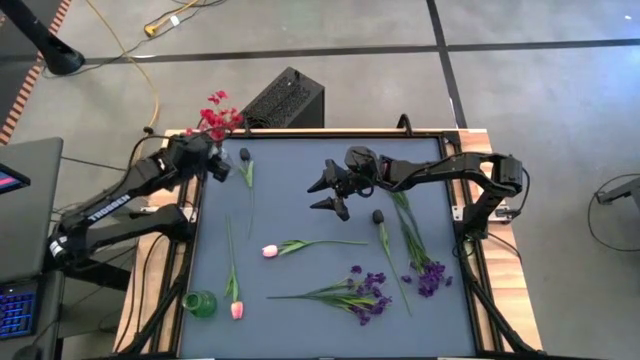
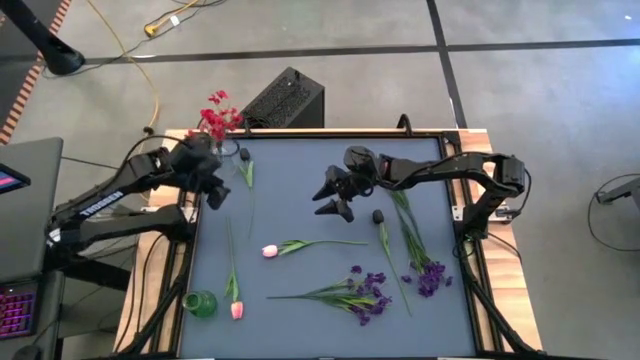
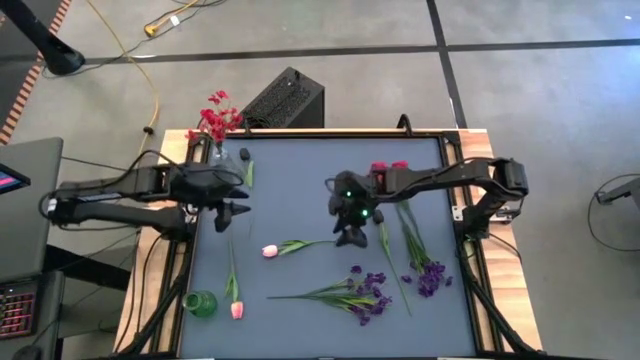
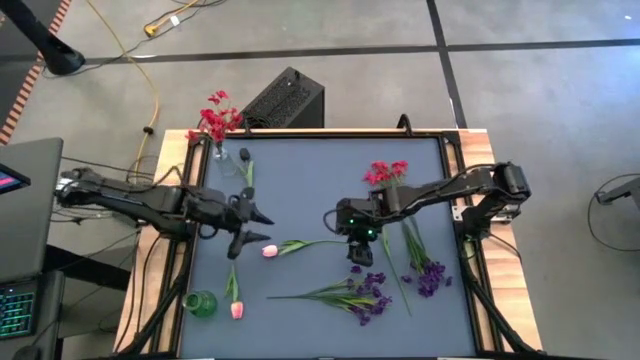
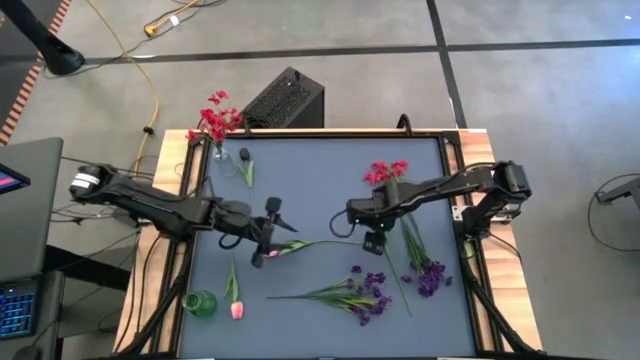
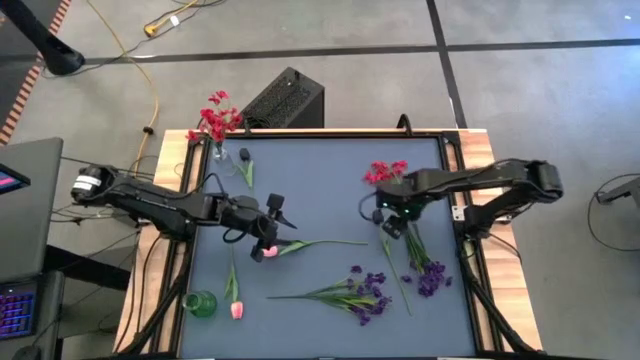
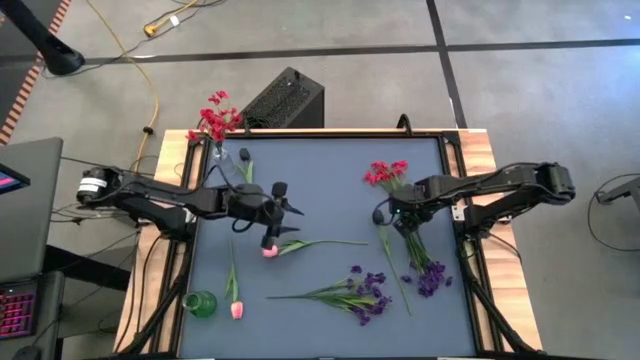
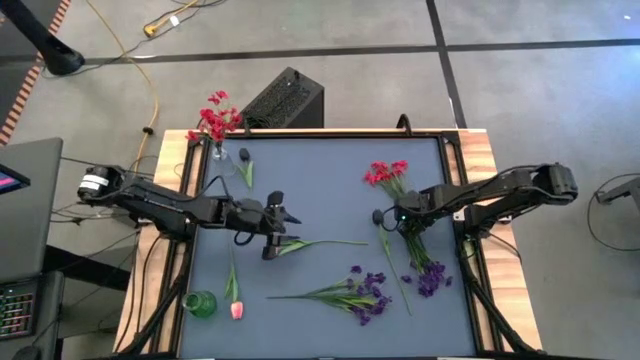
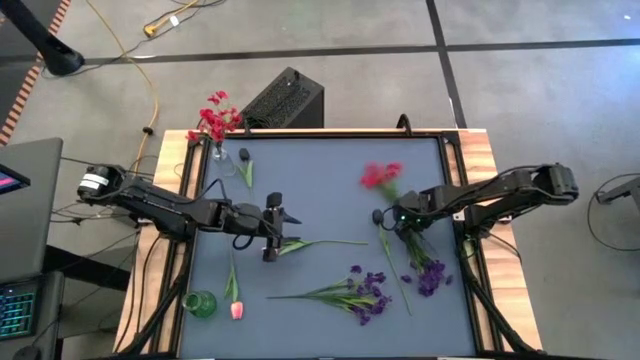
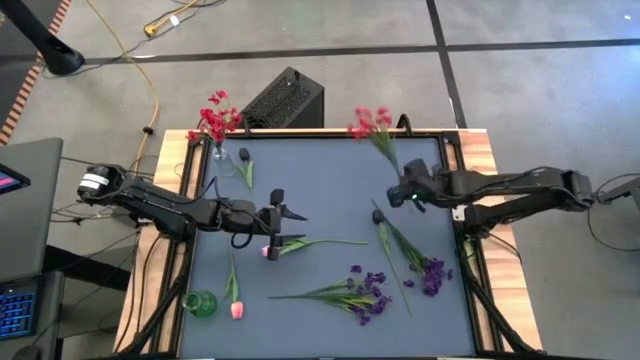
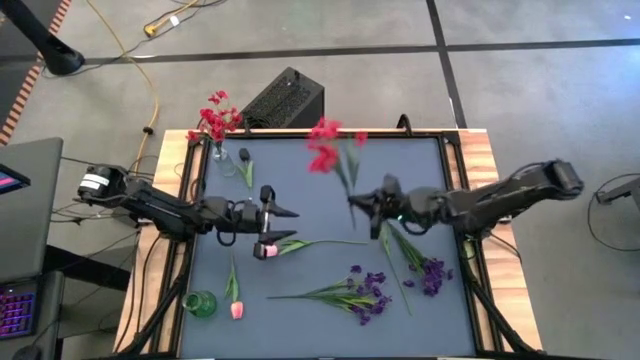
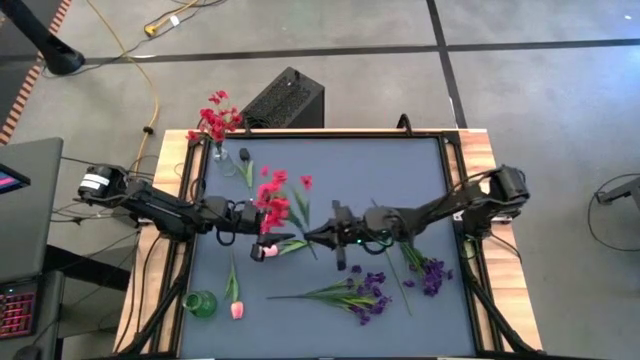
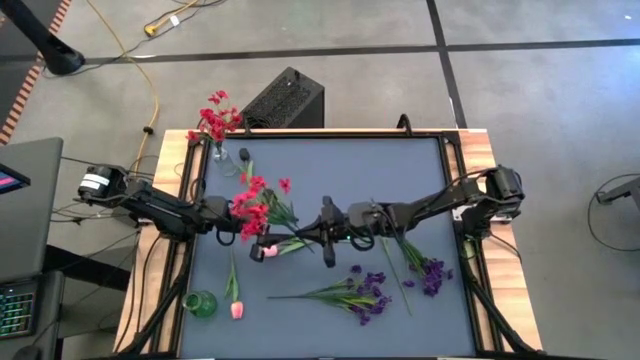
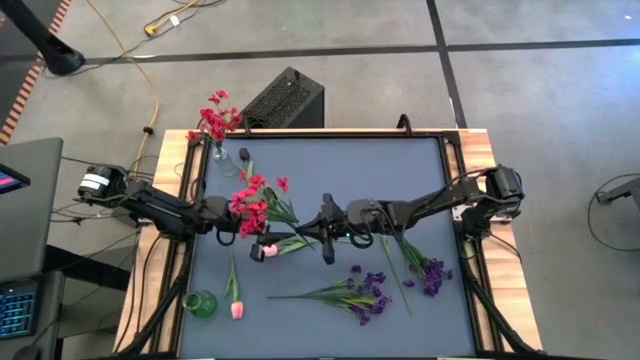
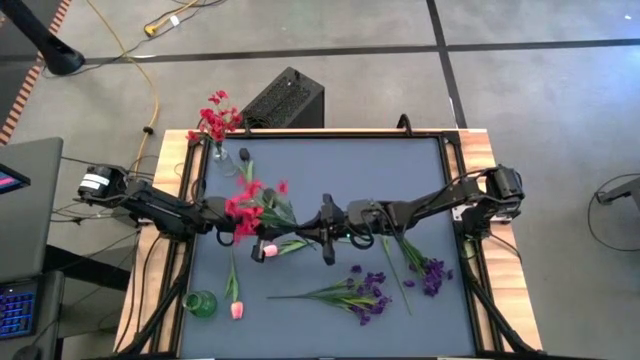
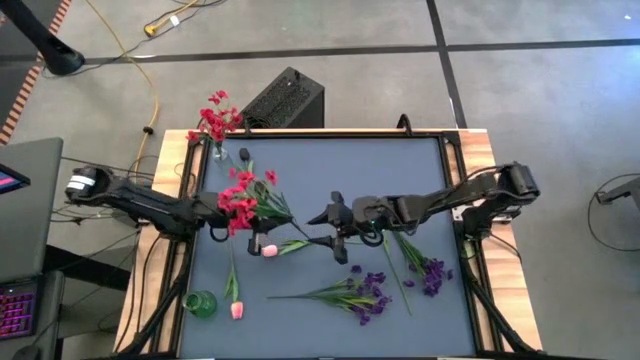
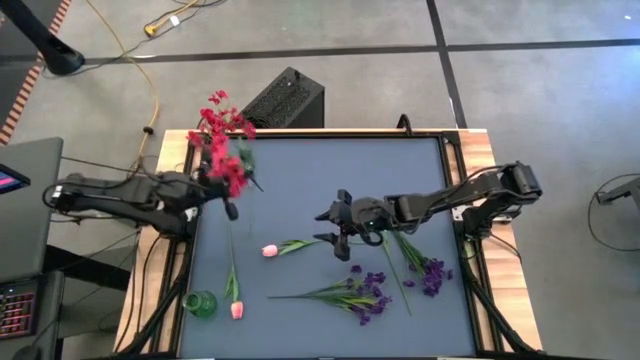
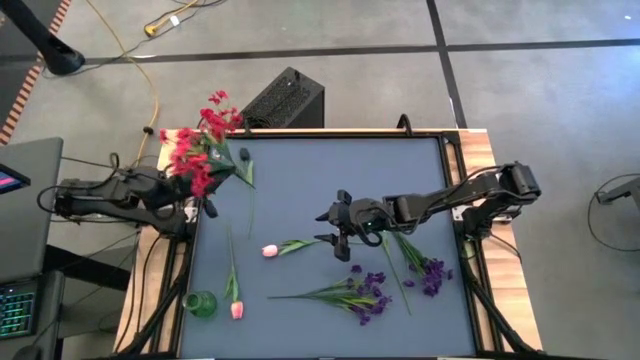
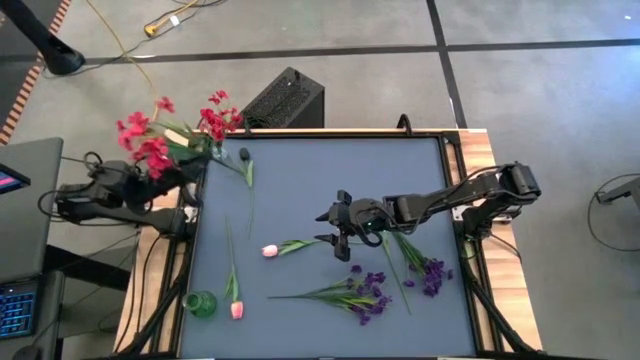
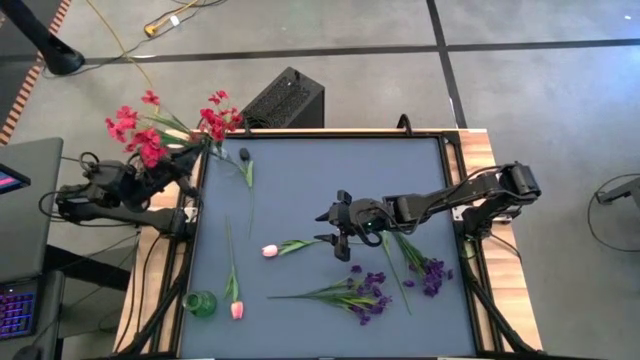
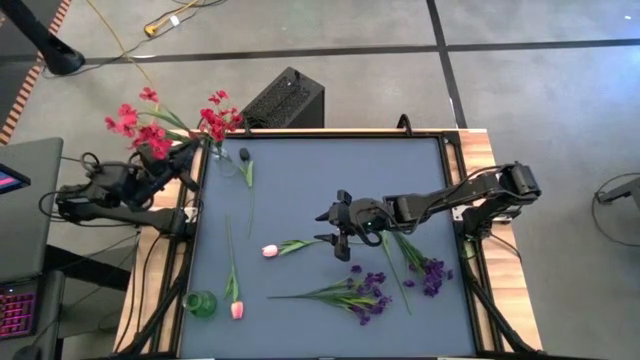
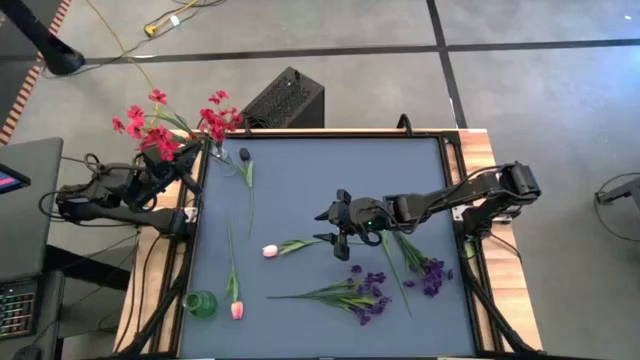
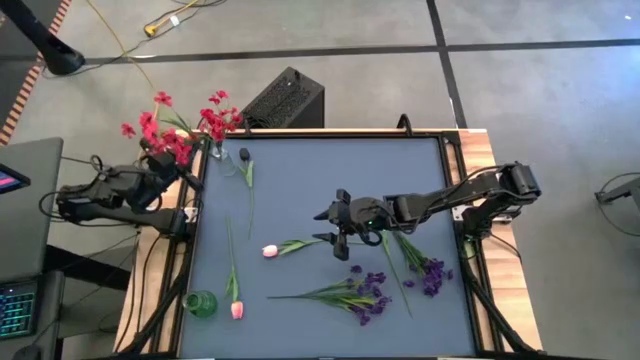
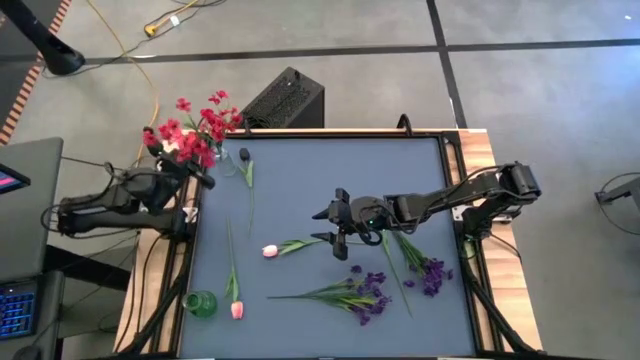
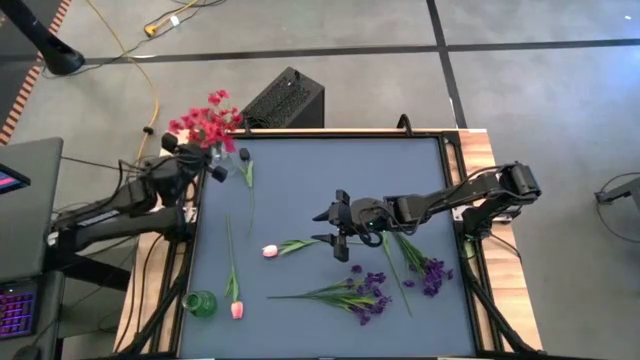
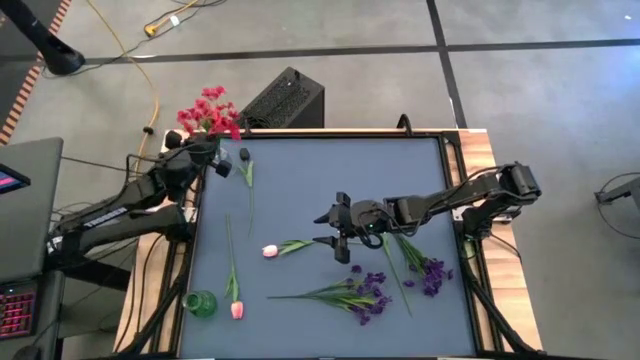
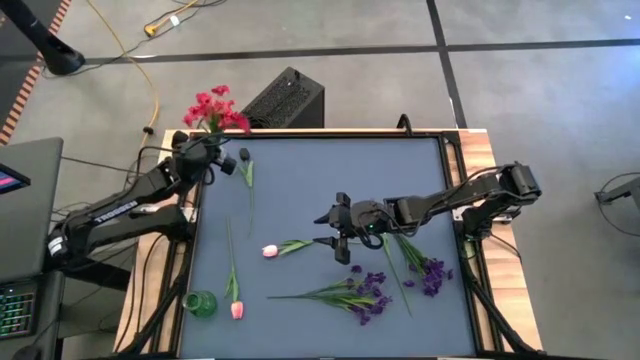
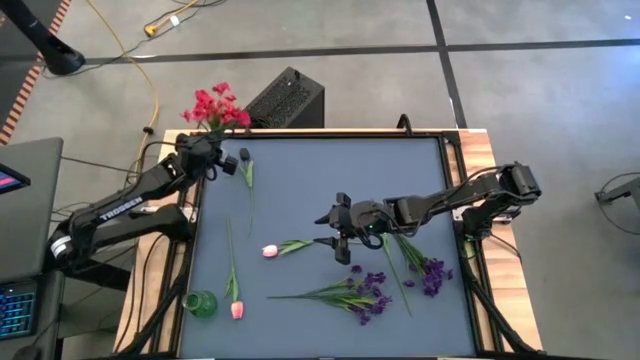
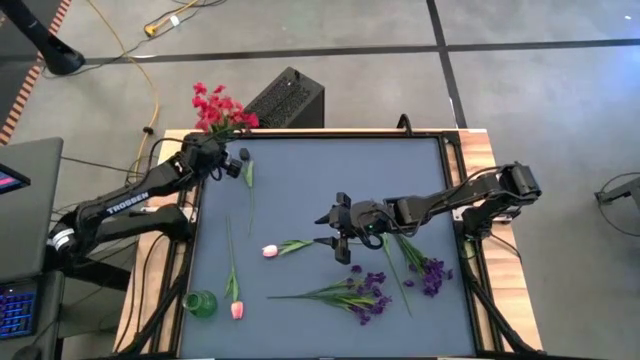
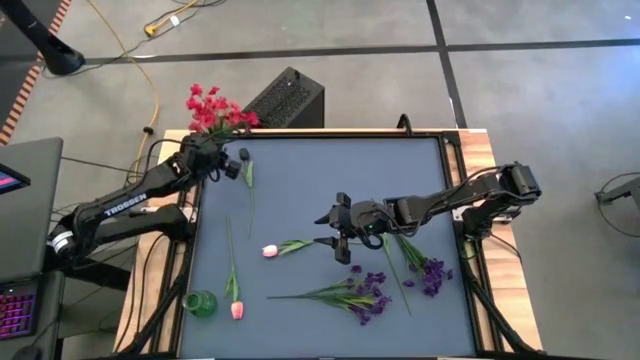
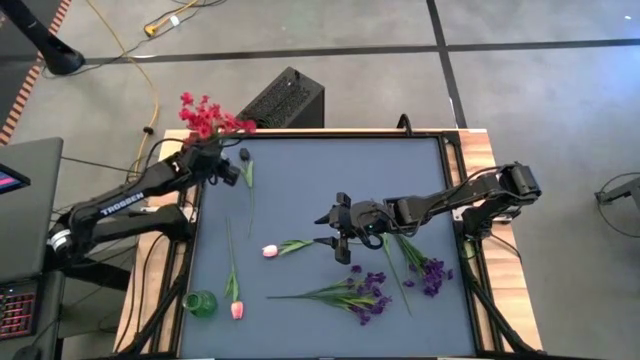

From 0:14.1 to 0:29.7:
Task: Sort flowers into vase by color
Put the red flowers into the transparent vase

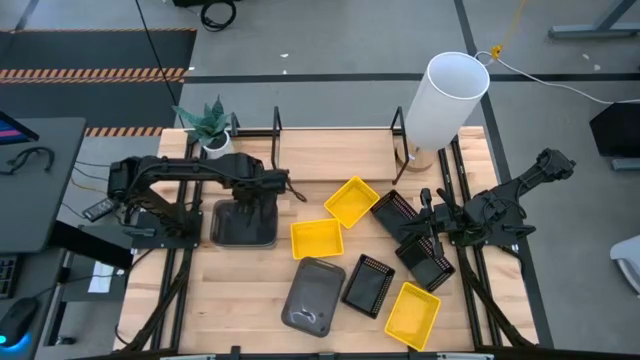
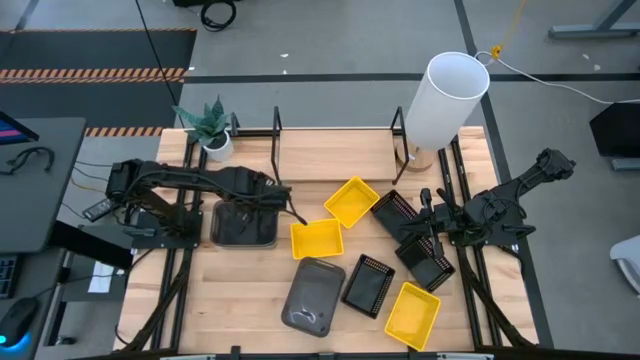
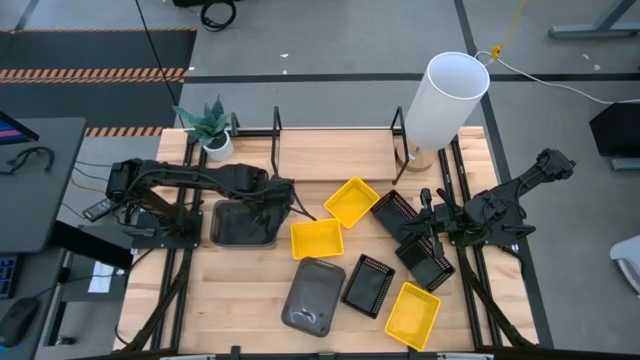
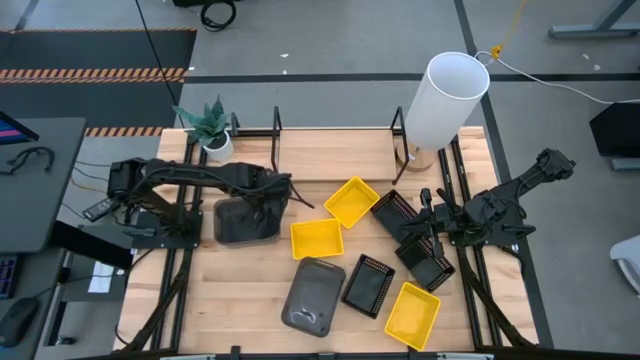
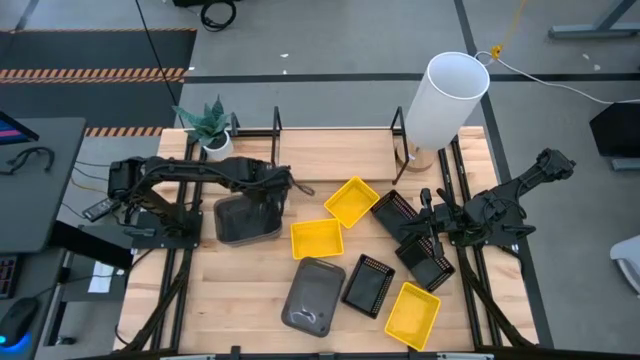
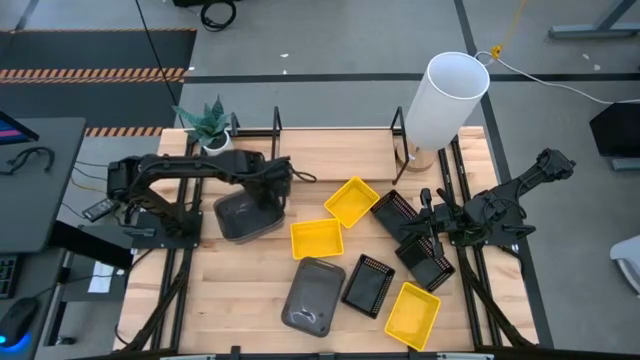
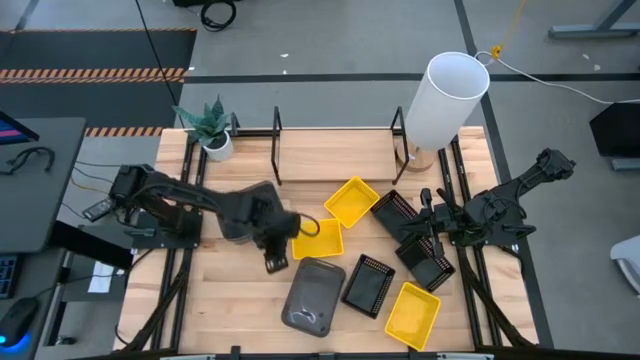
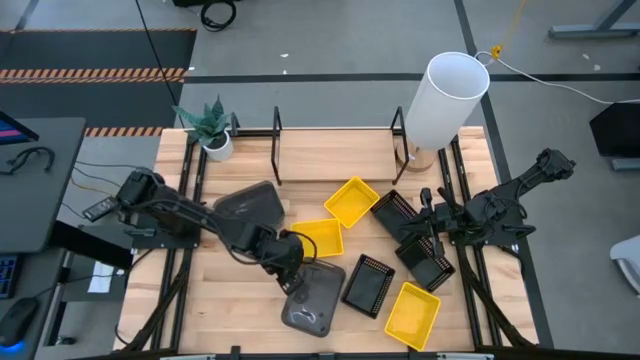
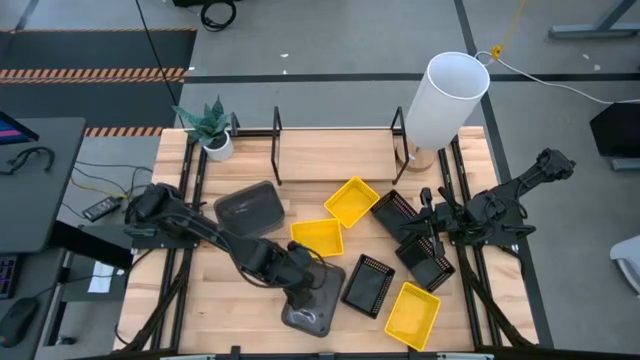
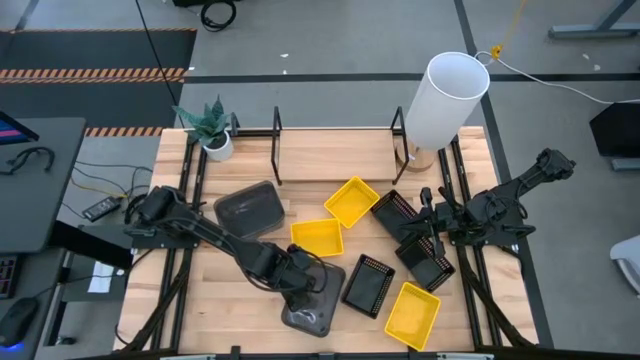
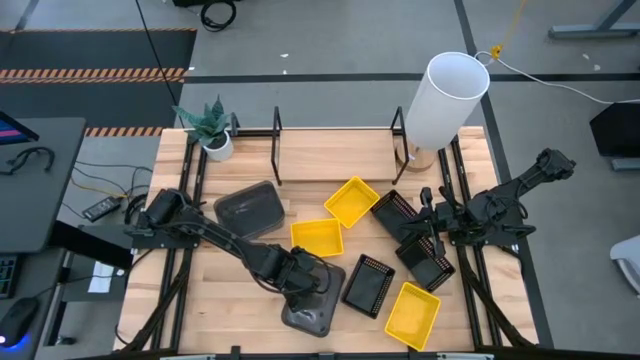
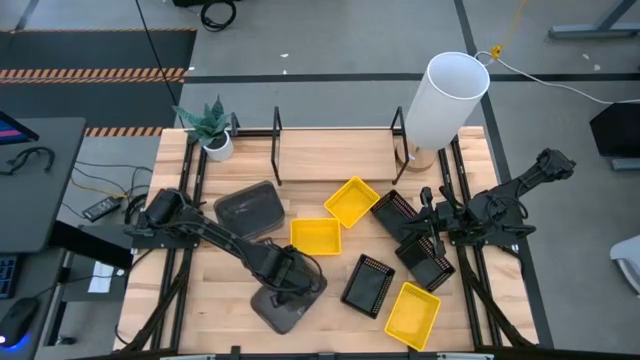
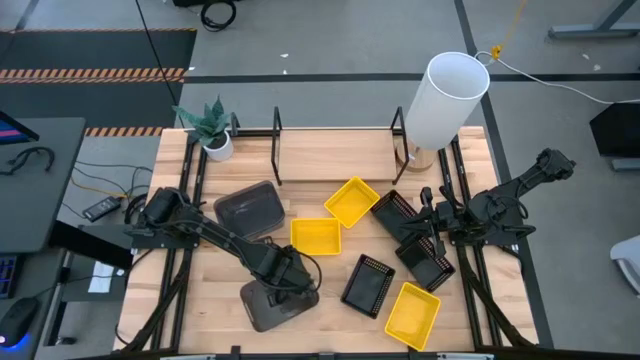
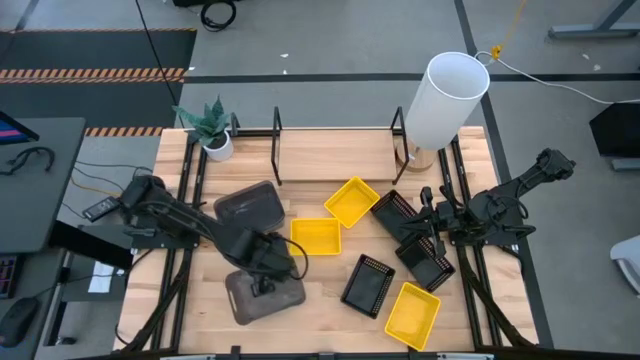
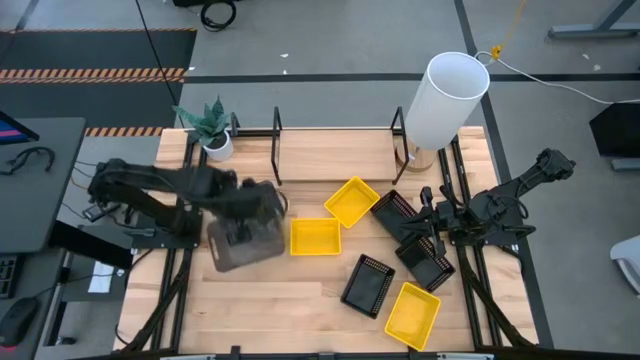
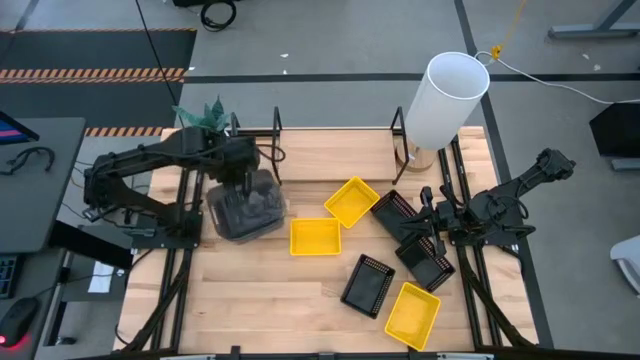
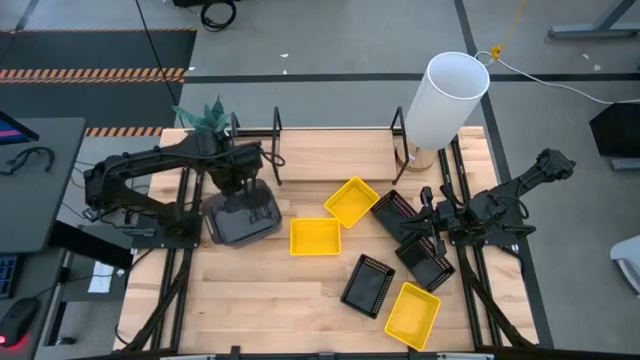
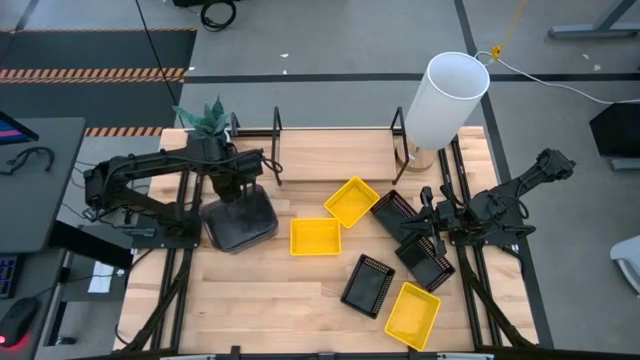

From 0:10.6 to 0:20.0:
Task: Stack baskets on shelf by color
Stack the bottom transparent black bin on top of the top transparent black bin
